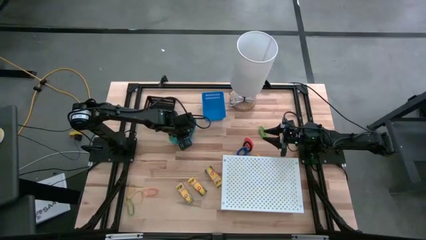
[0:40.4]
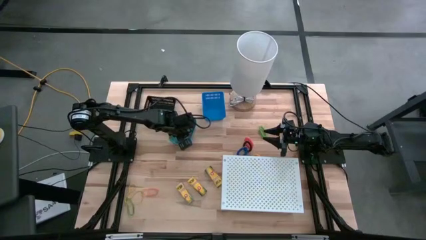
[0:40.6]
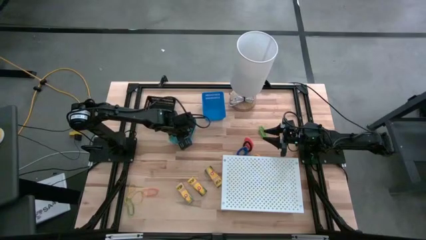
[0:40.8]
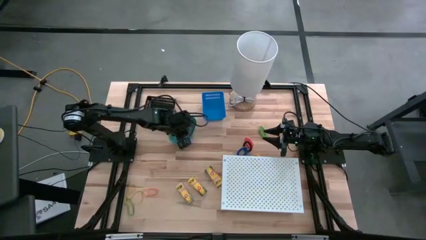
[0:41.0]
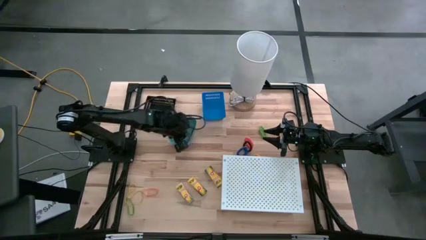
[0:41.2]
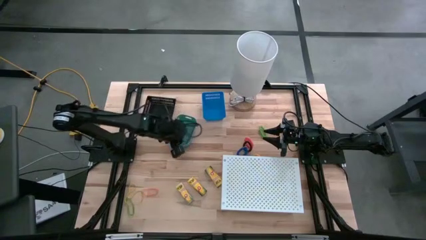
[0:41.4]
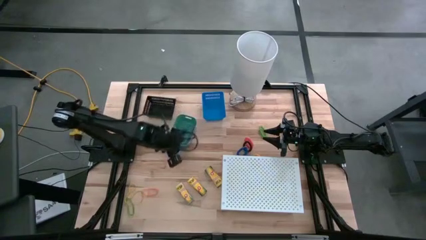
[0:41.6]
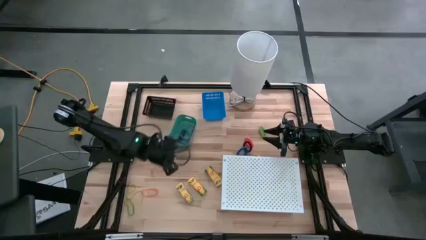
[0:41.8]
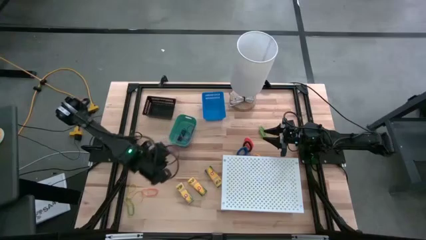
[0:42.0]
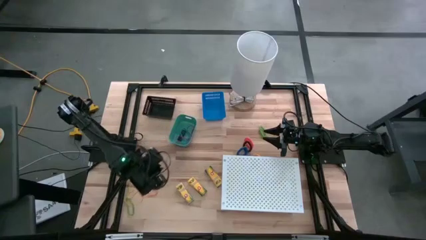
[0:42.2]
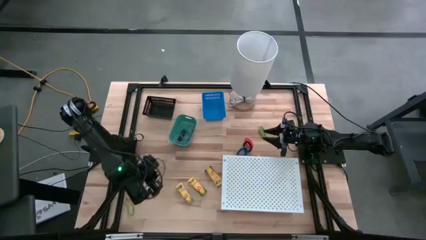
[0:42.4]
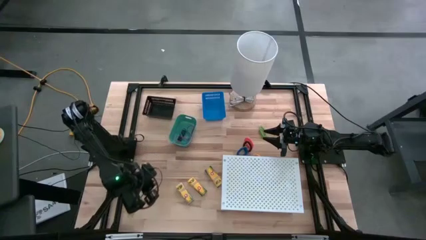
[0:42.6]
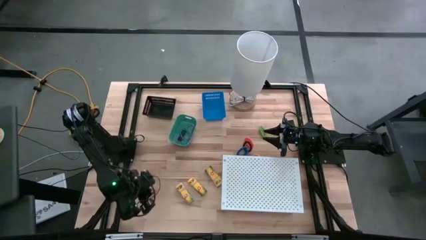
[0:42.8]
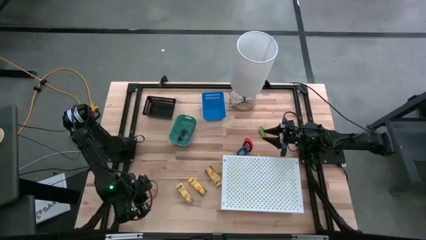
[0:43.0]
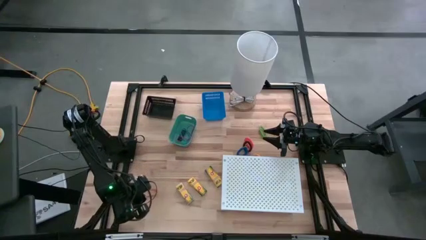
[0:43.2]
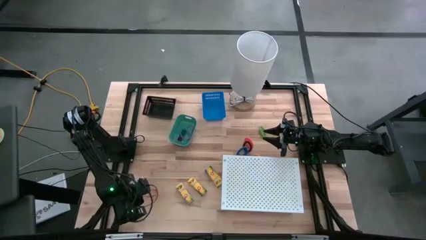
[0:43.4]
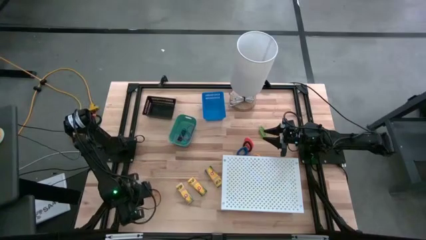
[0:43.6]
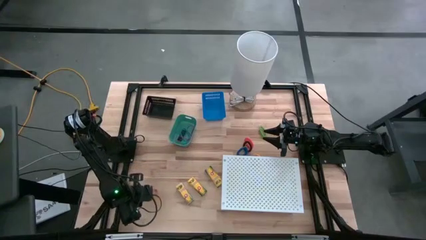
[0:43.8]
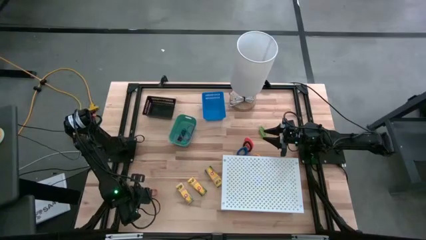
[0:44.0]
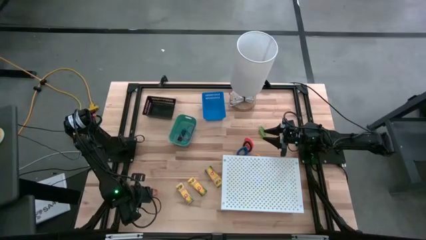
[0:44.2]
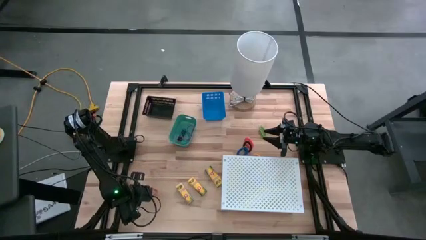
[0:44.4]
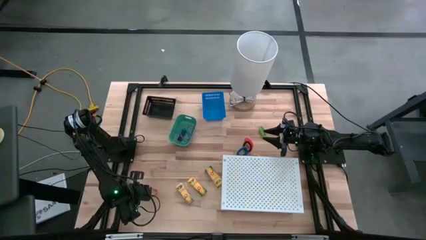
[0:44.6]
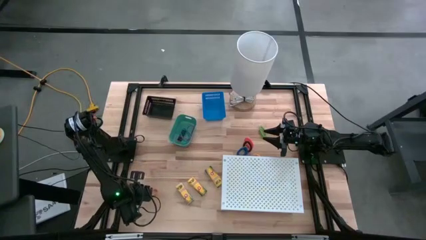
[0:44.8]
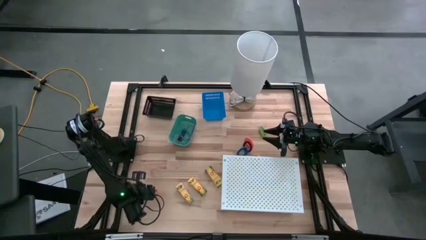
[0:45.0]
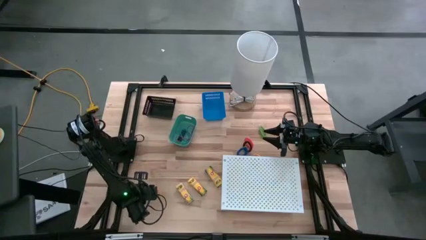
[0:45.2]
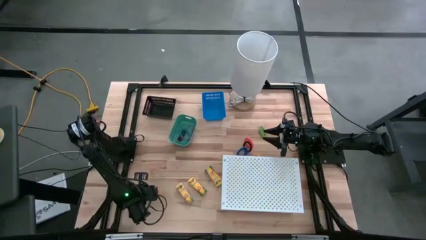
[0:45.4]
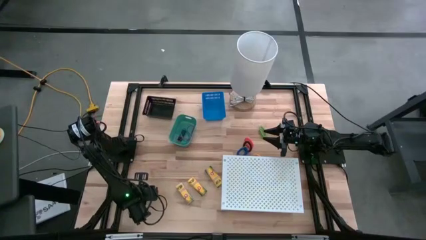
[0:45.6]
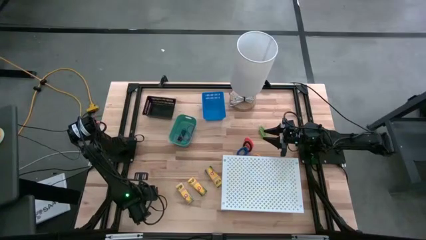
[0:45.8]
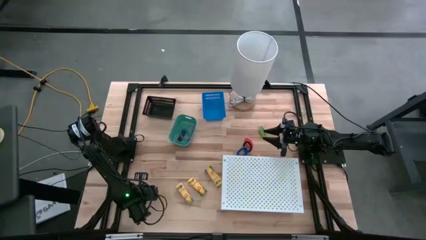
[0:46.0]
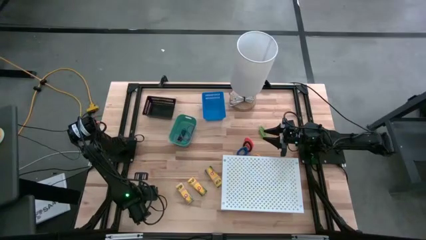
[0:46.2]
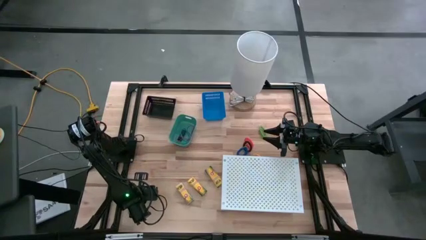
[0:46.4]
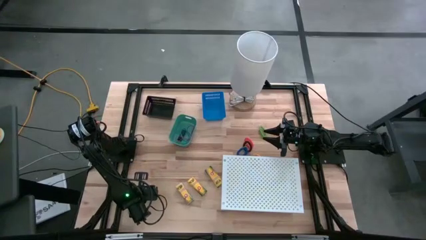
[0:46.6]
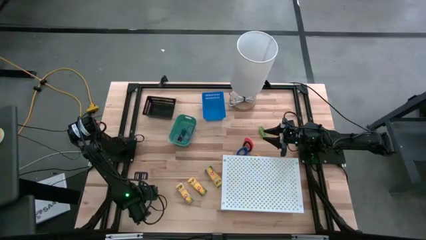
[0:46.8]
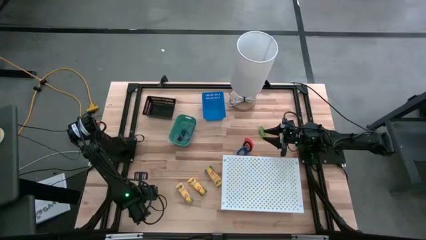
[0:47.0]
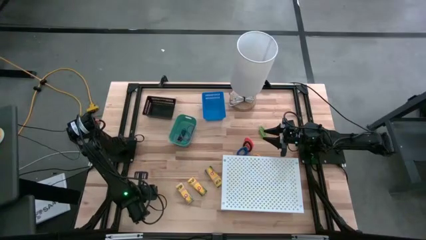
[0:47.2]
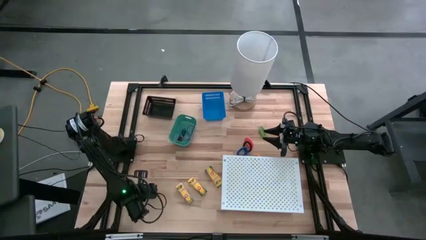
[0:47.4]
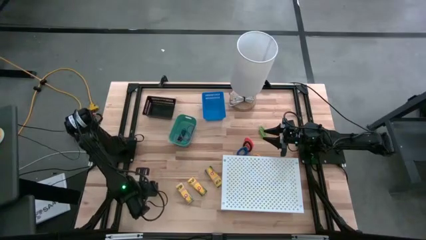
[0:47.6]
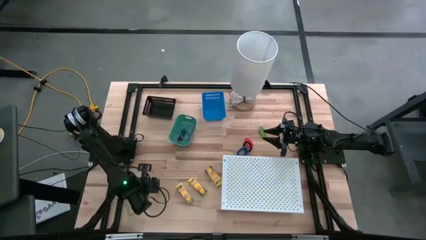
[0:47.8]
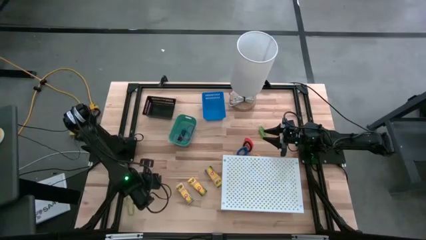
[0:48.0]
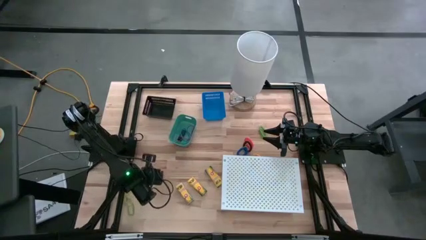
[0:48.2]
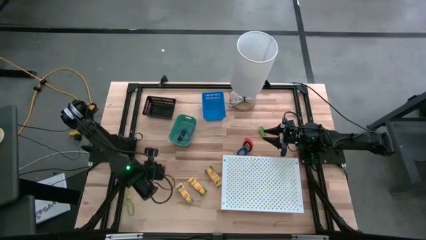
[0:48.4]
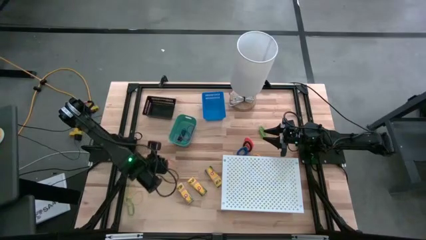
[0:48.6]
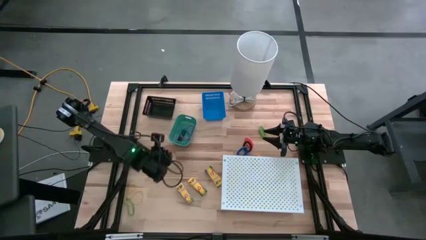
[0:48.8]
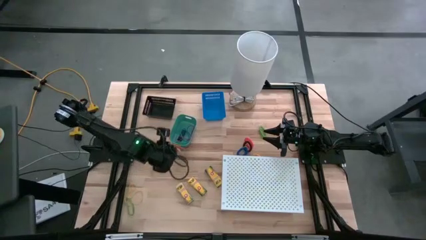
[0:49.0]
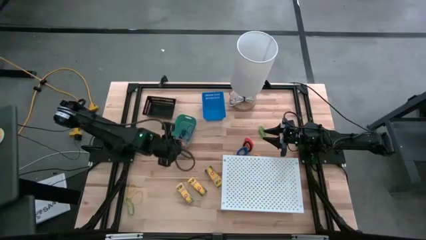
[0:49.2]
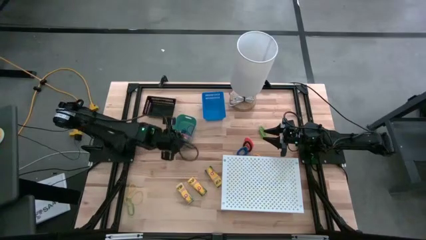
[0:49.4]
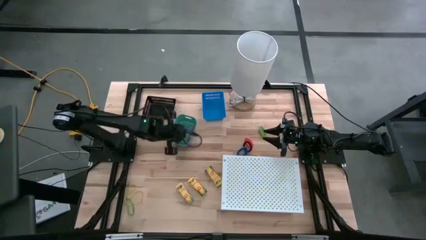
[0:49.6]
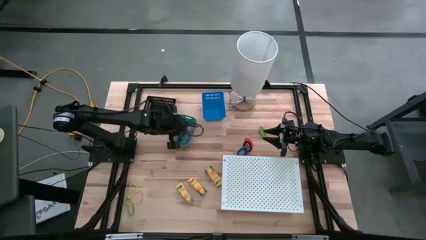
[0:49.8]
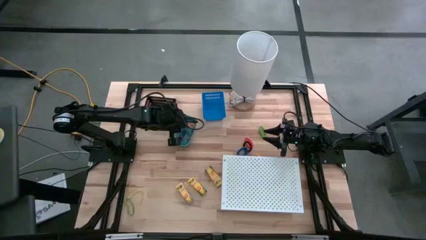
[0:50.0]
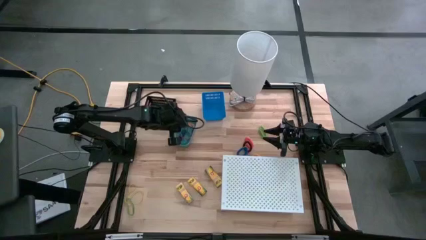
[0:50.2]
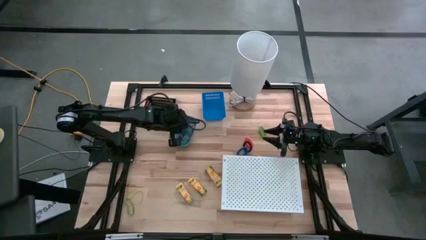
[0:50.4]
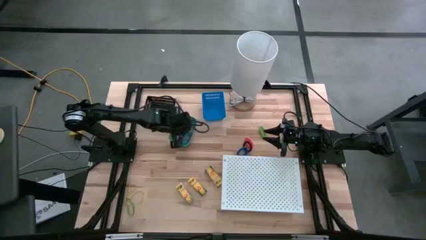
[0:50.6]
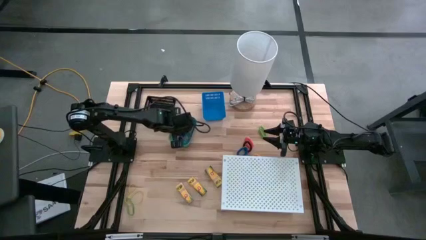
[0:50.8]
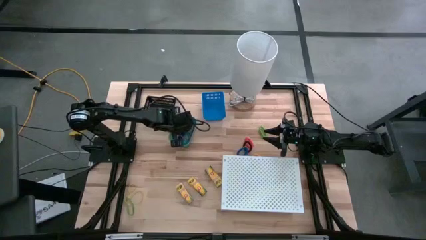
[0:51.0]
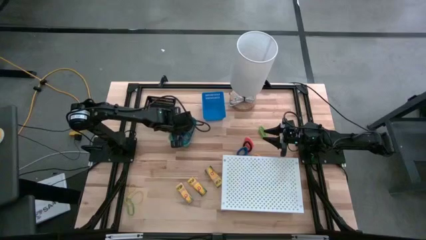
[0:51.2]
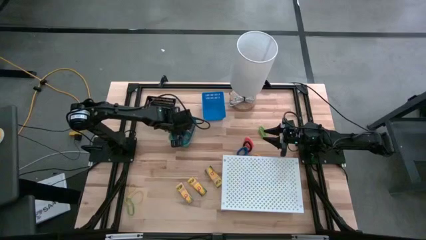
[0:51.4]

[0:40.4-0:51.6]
Task: Pick & Place Office Desk Supplies
Put the orange rubber band into the green bin
